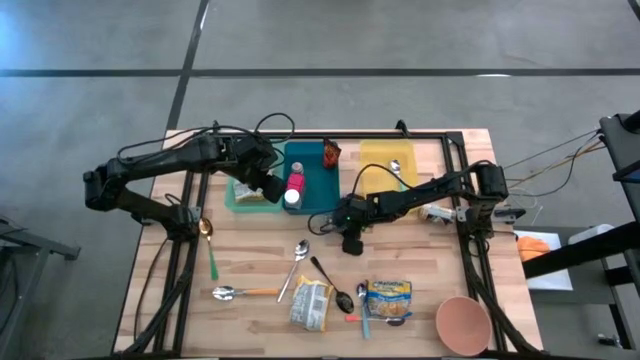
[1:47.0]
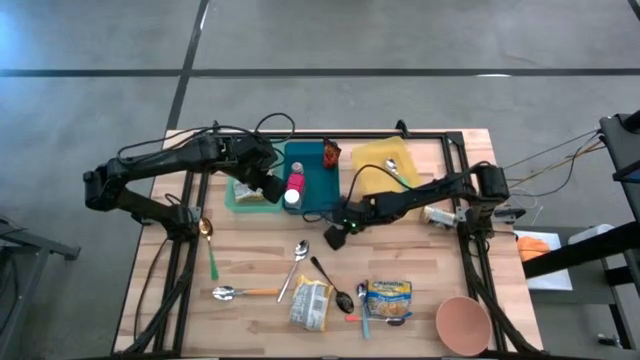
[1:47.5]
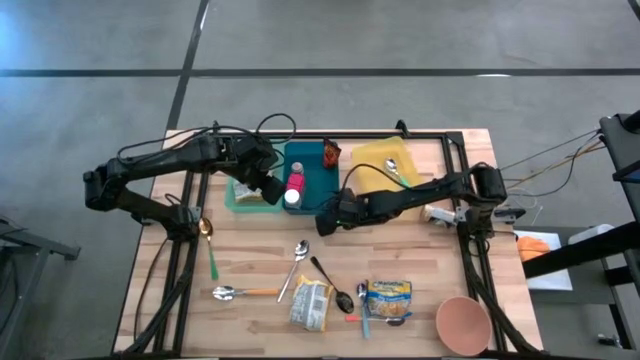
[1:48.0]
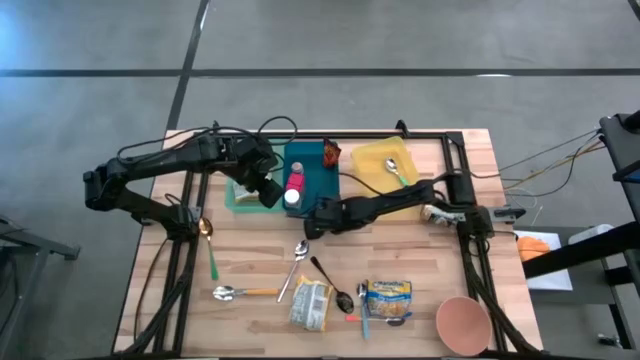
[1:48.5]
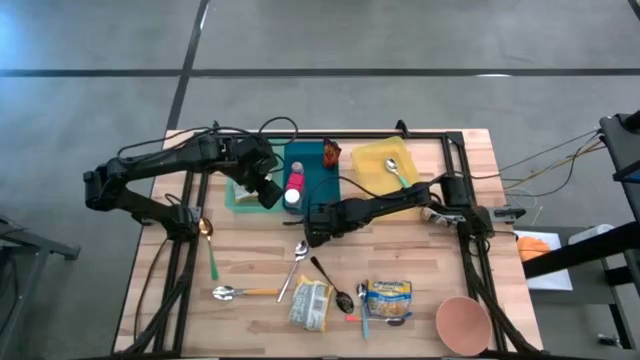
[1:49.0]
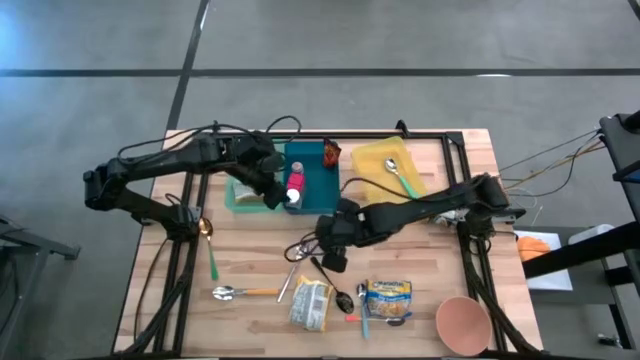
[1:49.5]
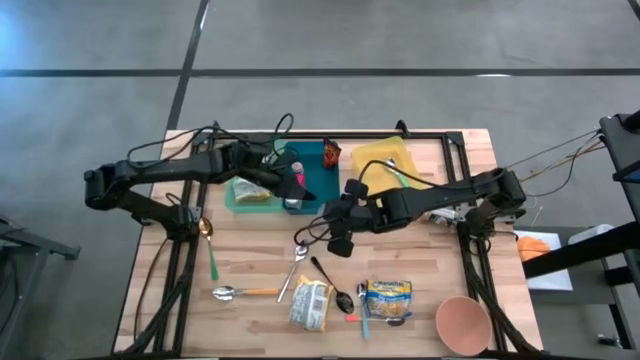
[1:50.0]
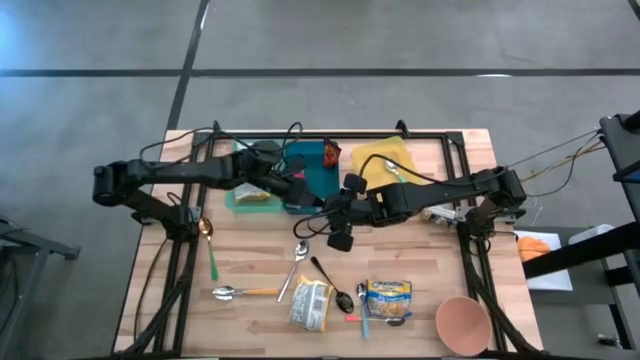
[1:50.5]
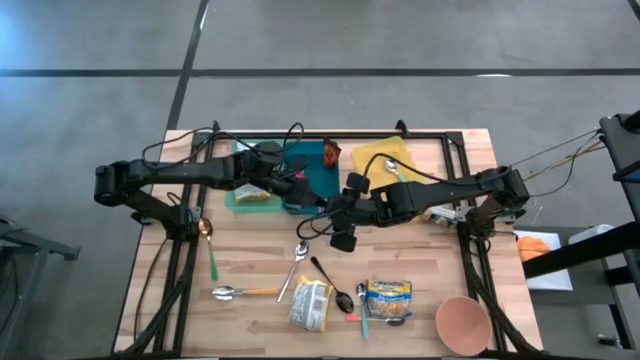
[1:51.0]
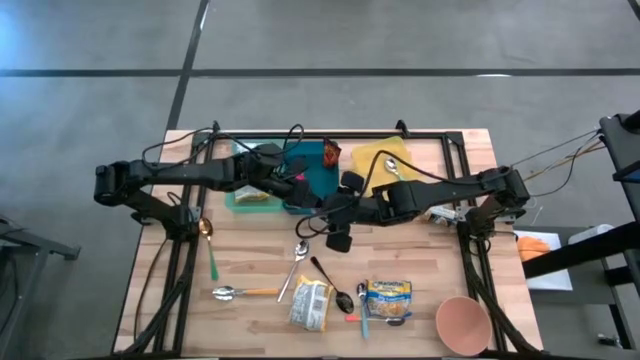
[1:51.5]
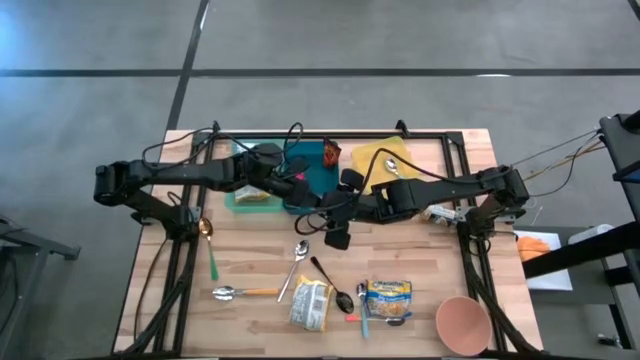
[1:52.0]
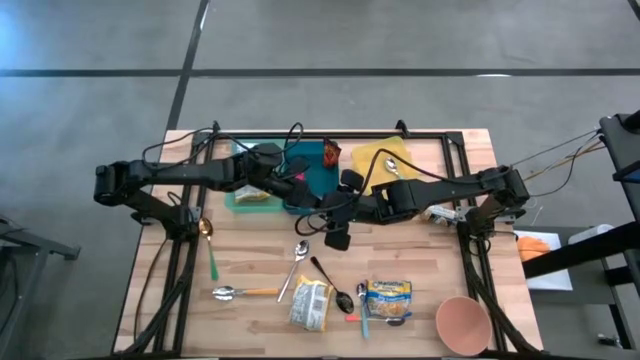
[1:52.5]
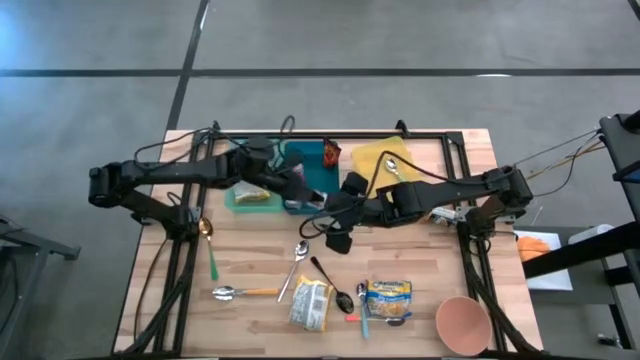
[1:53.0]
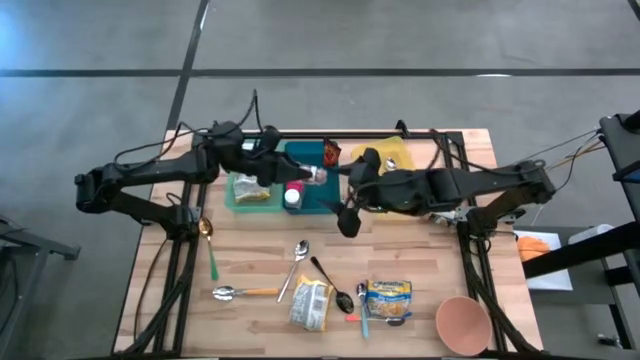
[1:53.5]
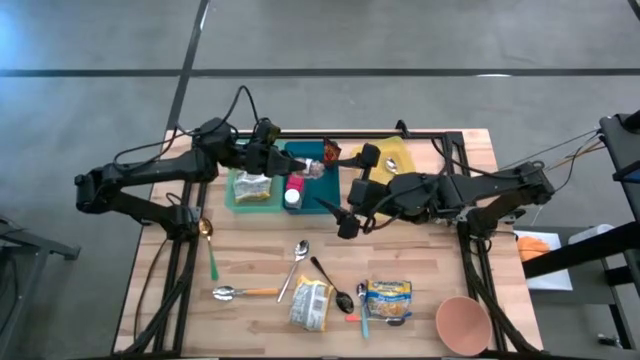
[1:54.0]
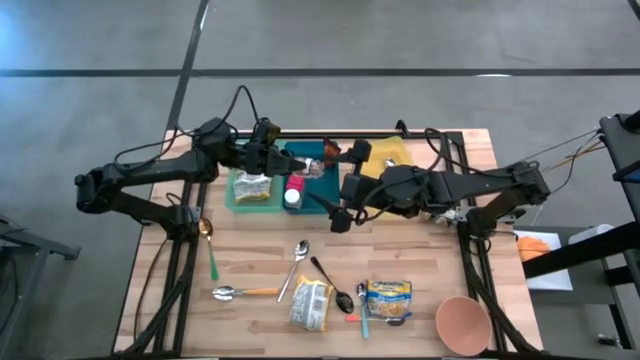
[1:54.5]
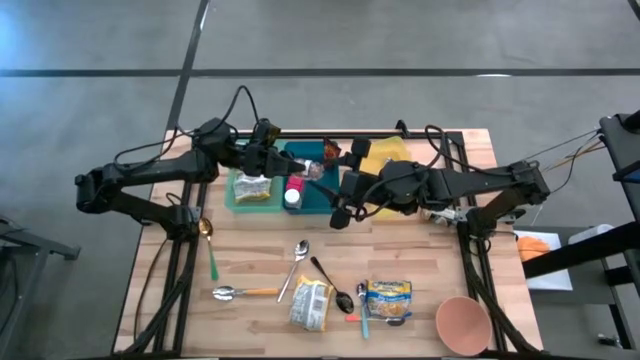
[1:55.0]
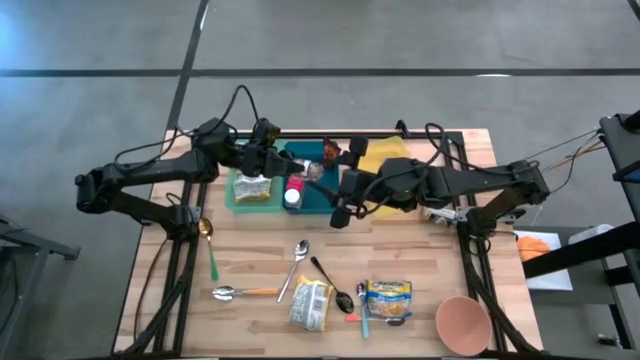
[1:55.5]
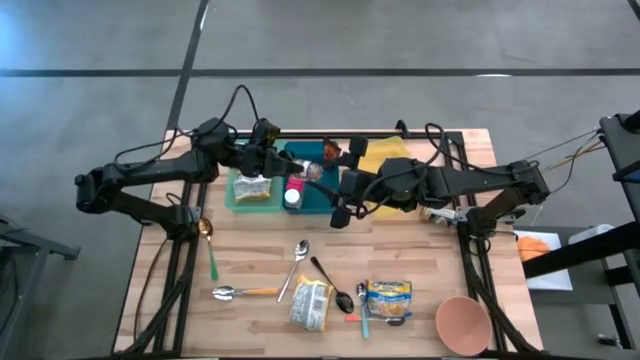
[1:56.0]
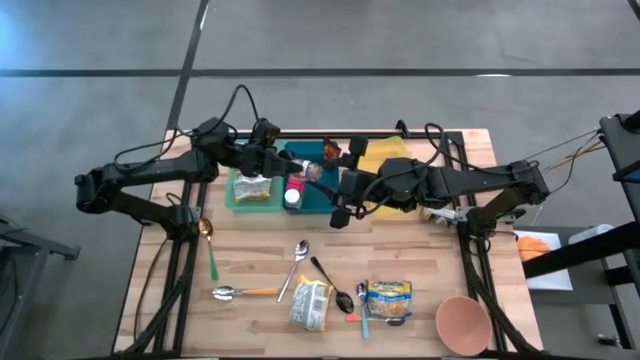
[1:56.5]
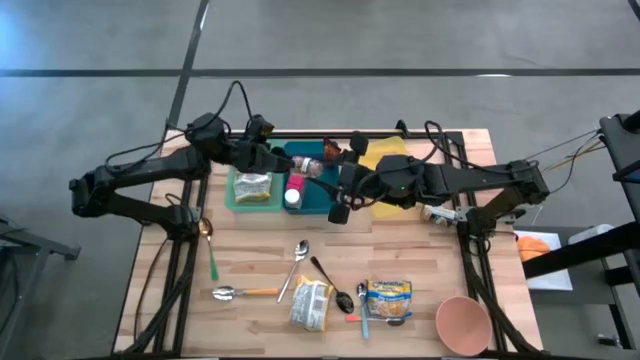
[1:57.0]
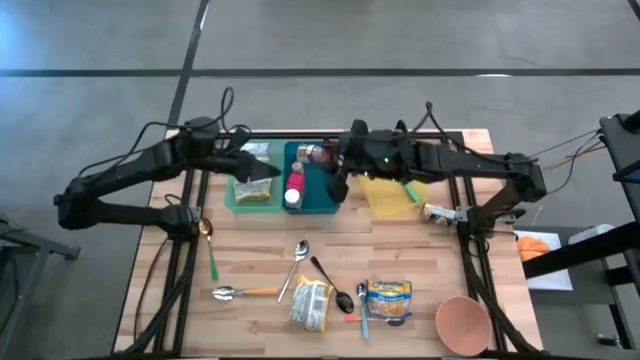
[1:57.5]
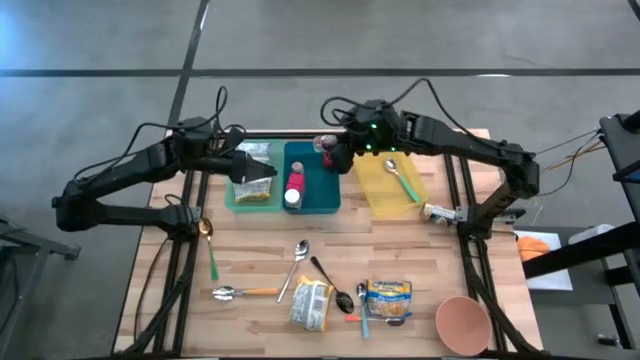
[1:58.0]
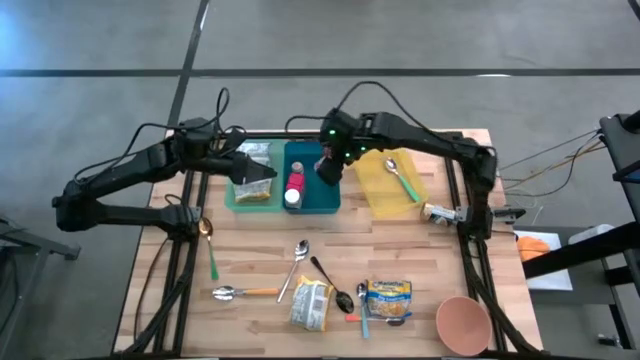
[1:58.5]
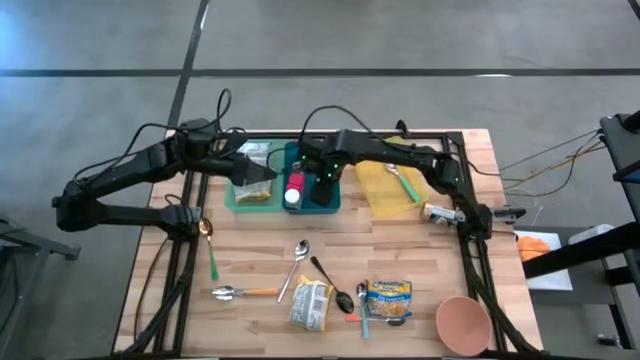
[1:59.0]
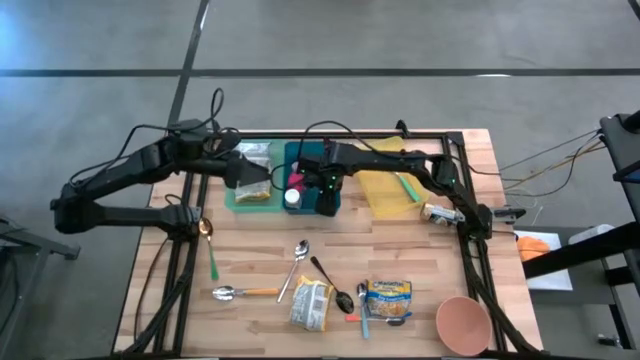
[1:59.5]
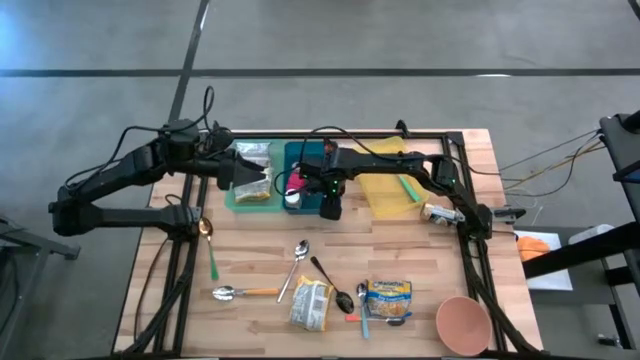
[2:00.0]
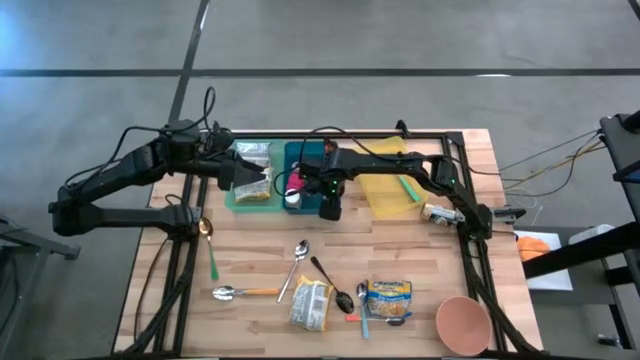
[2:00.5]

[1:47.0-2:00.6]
Put the brown seasoning bottle into the blue bin

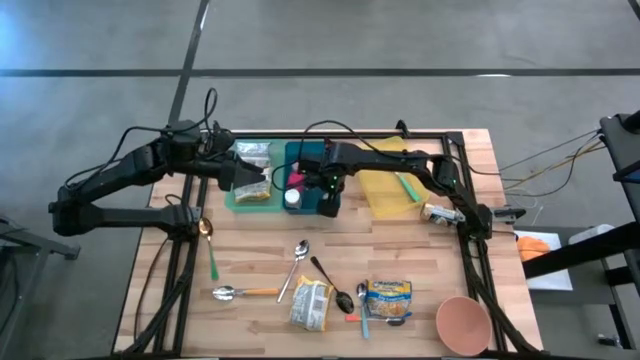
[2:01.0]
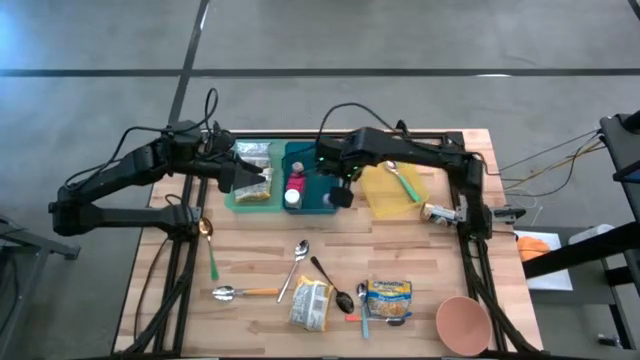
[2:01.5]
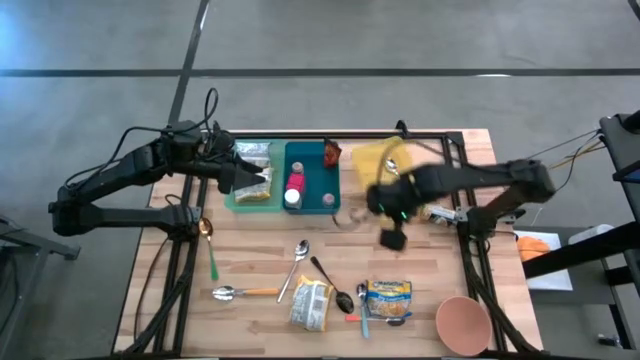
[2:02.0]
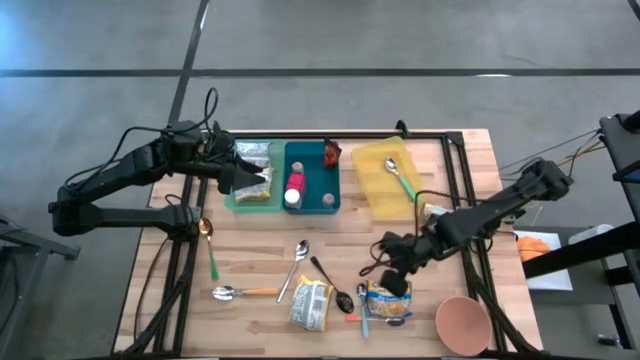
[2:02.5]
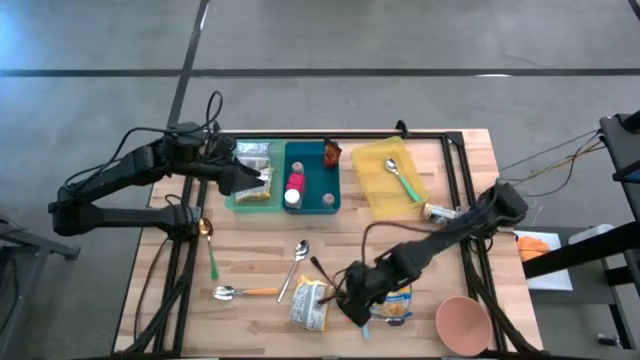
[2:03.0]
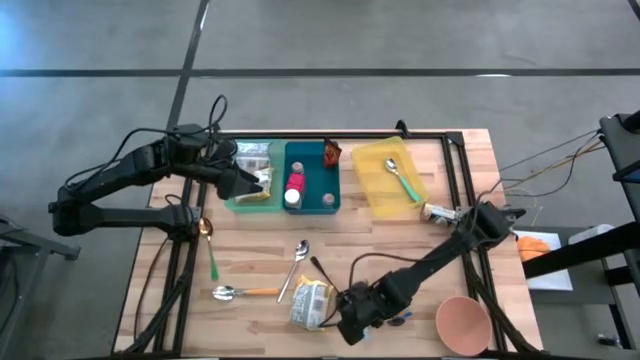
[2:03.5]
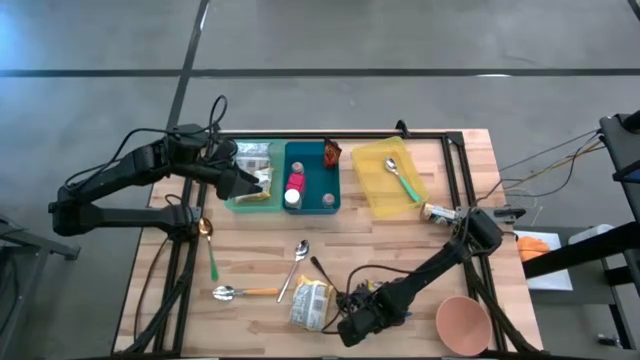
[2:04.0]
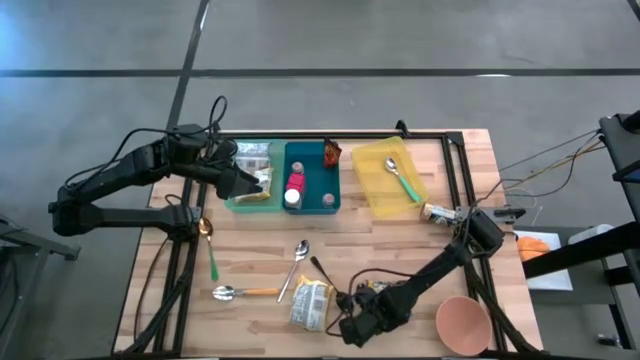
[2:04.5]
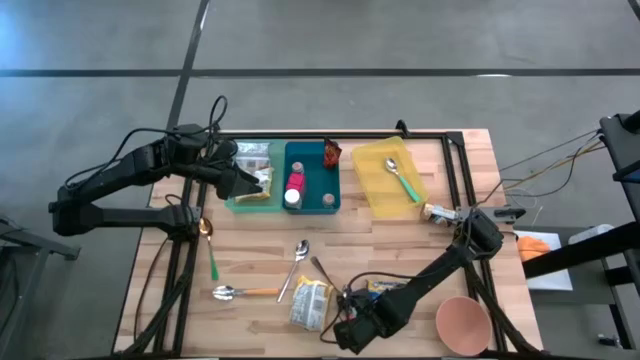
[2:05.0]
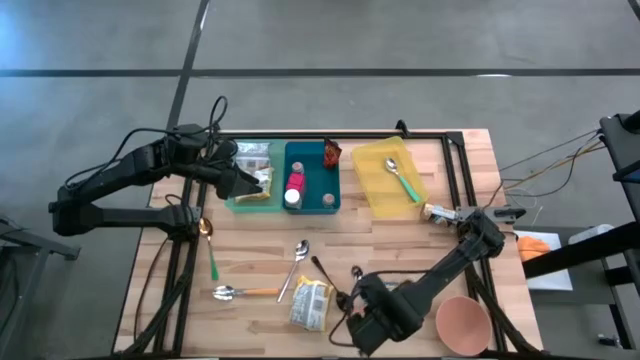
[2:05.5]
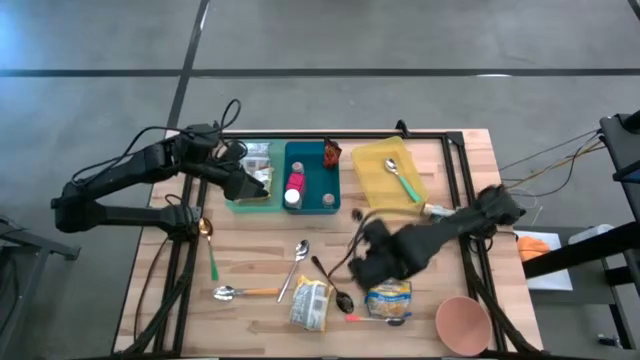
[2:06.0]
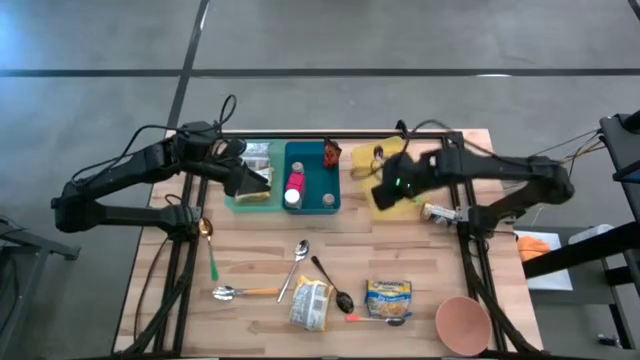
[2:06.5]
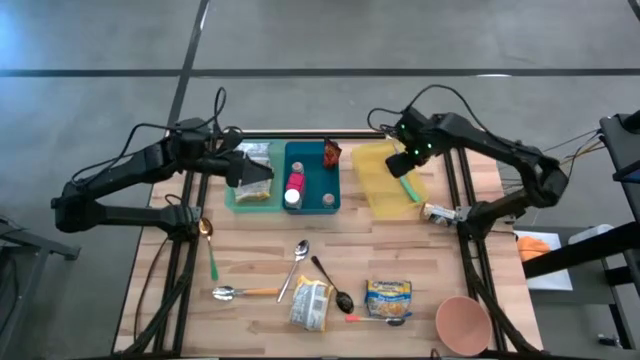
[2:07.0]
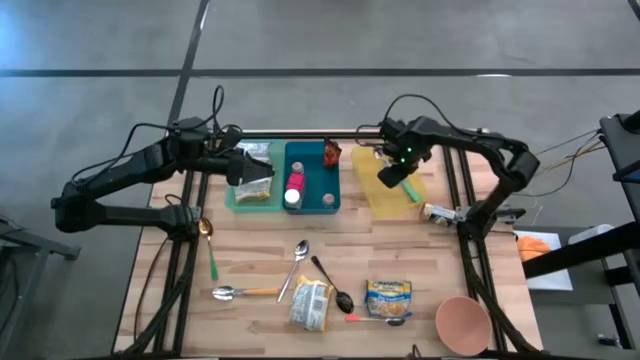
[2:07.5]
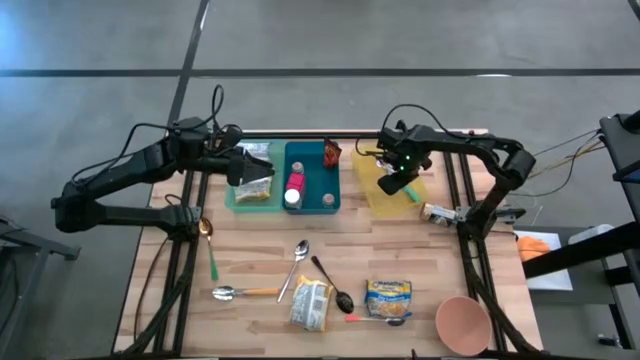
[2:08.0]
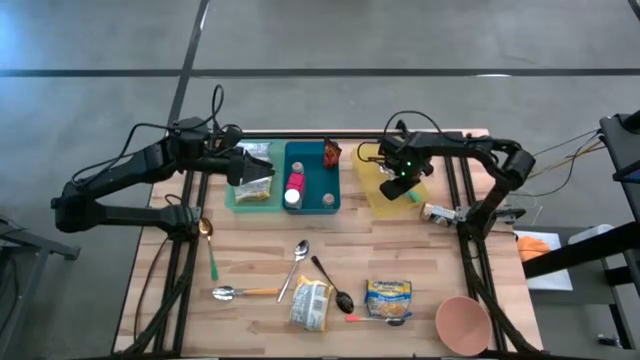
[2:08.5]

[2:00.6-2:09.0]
Put the blue spoon into the yellow bin
